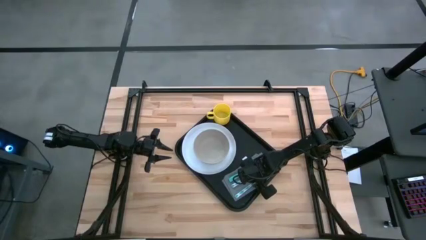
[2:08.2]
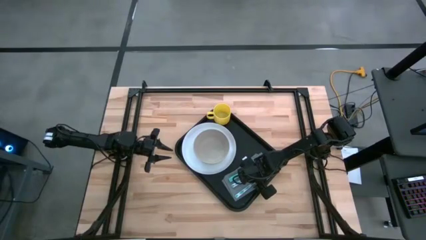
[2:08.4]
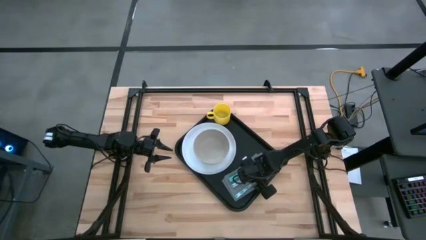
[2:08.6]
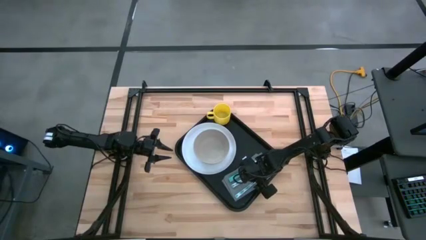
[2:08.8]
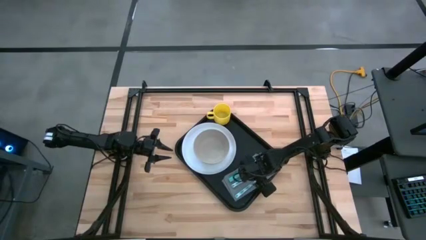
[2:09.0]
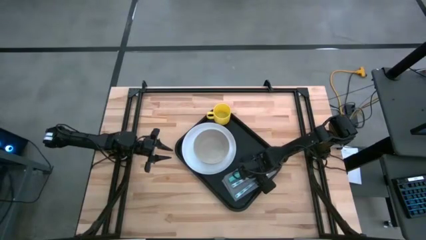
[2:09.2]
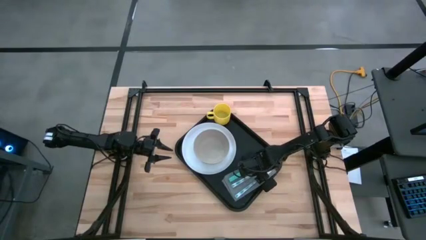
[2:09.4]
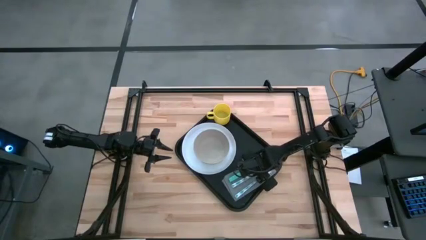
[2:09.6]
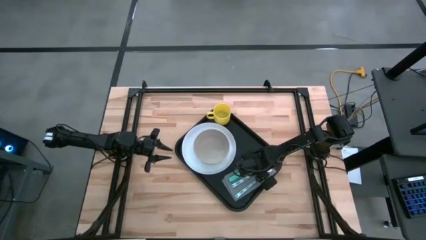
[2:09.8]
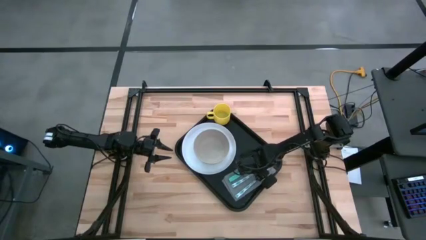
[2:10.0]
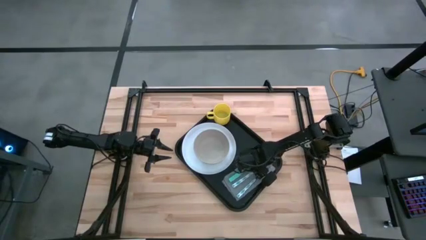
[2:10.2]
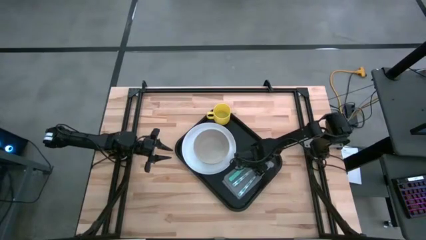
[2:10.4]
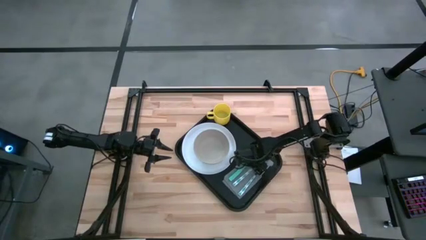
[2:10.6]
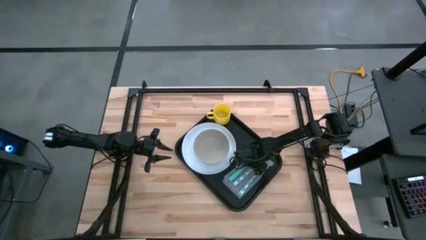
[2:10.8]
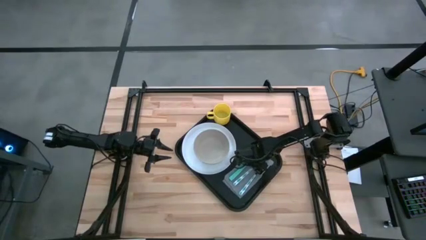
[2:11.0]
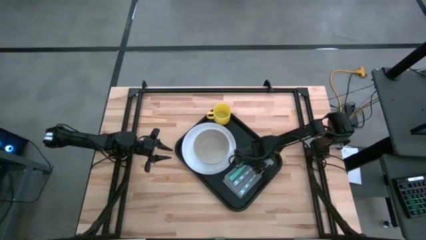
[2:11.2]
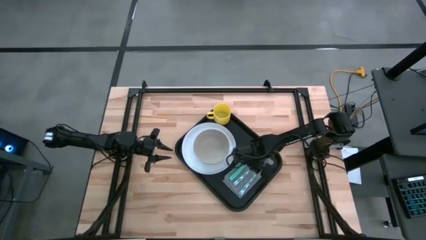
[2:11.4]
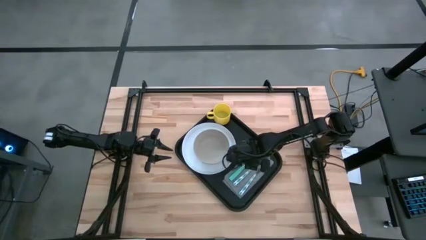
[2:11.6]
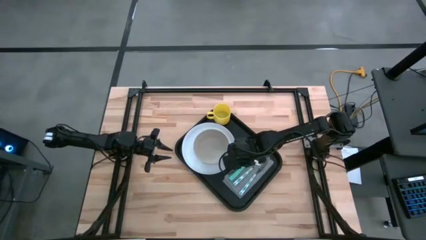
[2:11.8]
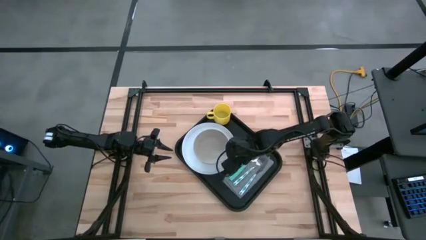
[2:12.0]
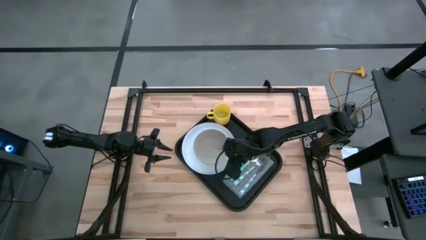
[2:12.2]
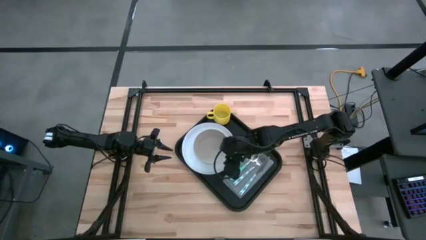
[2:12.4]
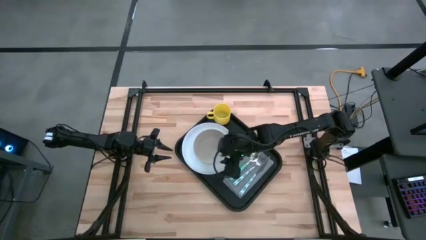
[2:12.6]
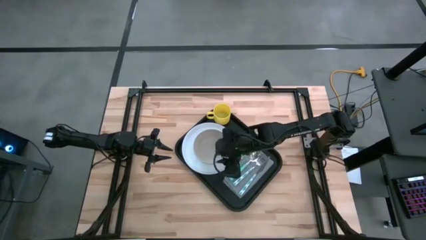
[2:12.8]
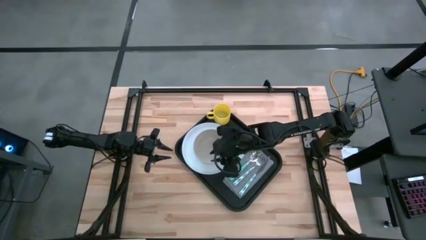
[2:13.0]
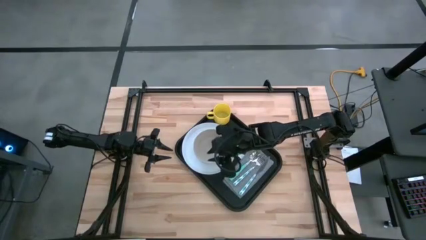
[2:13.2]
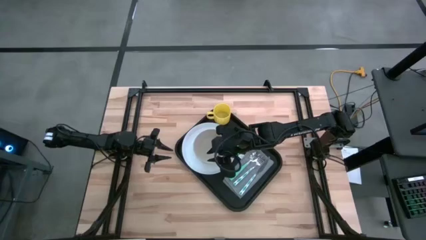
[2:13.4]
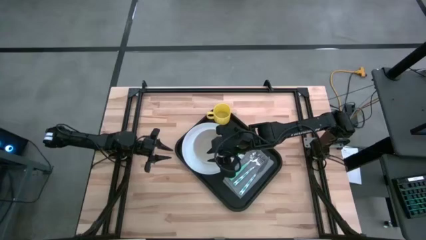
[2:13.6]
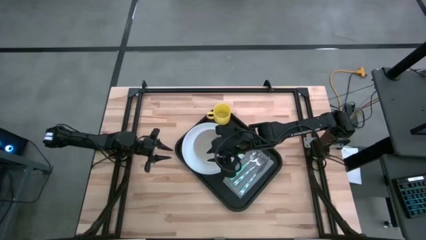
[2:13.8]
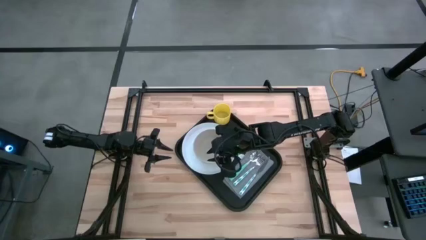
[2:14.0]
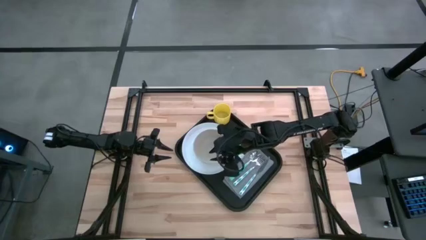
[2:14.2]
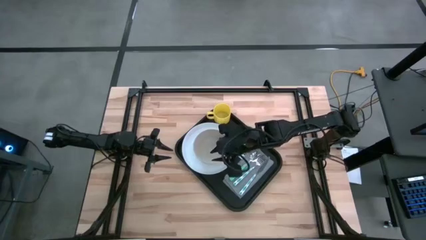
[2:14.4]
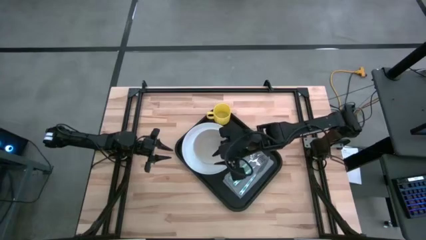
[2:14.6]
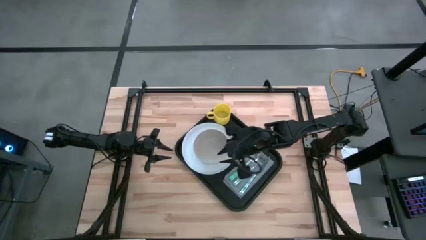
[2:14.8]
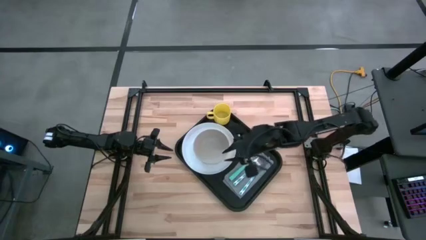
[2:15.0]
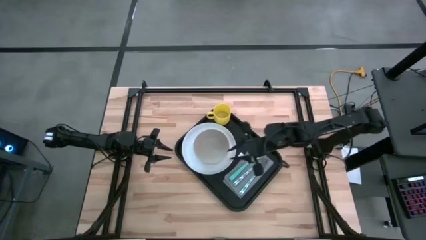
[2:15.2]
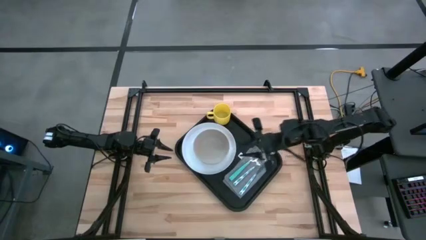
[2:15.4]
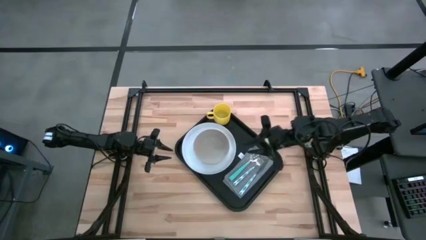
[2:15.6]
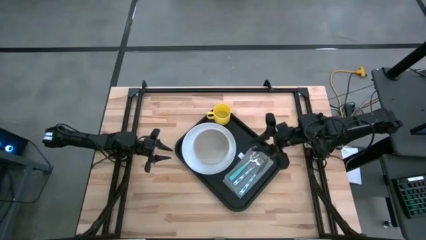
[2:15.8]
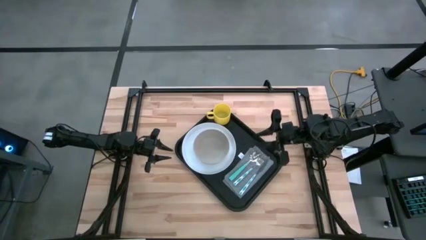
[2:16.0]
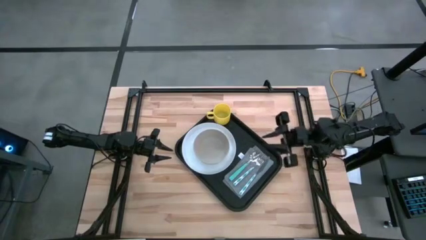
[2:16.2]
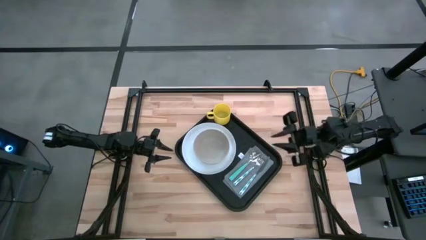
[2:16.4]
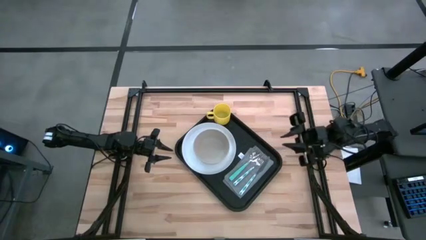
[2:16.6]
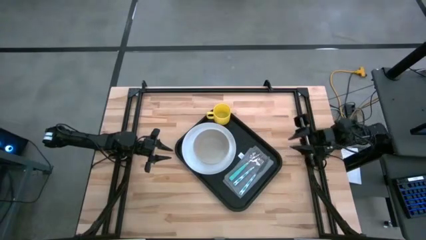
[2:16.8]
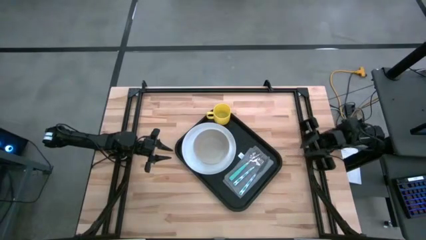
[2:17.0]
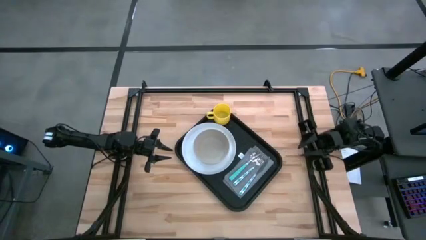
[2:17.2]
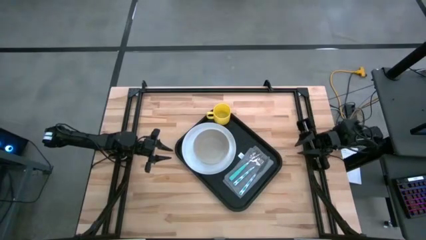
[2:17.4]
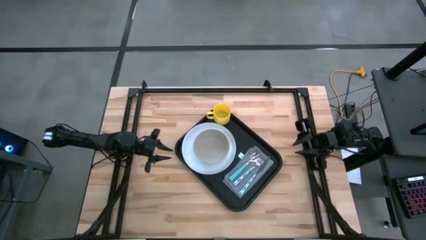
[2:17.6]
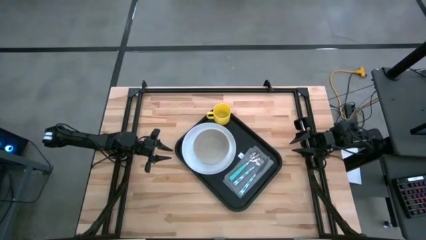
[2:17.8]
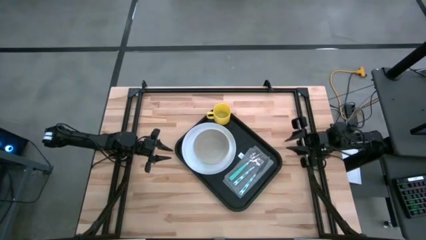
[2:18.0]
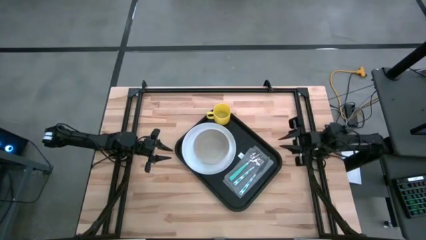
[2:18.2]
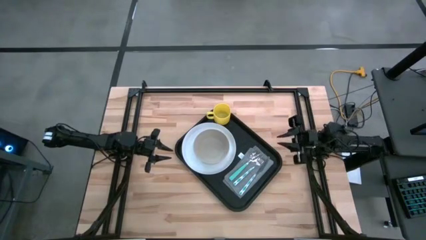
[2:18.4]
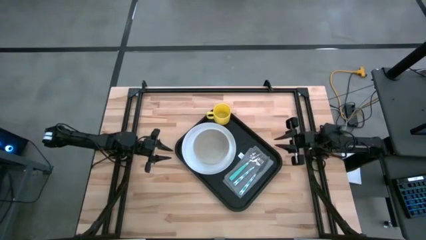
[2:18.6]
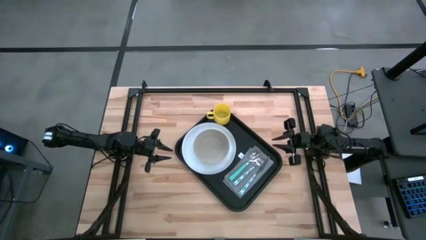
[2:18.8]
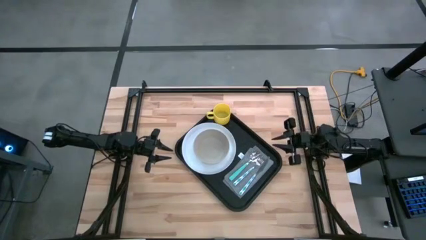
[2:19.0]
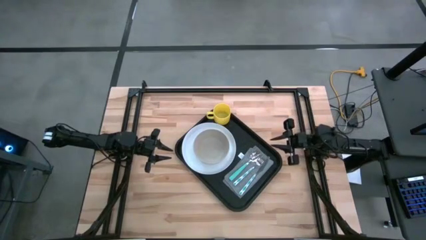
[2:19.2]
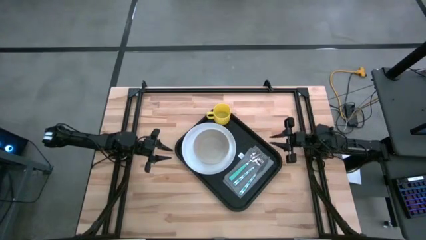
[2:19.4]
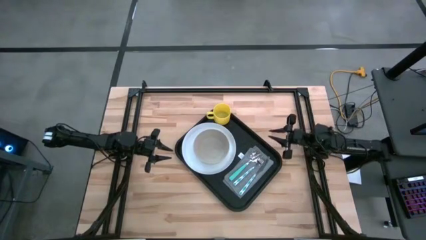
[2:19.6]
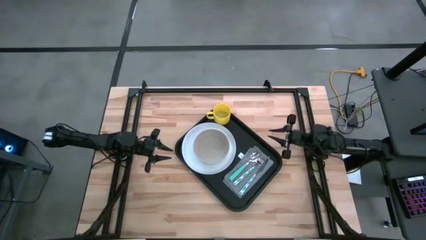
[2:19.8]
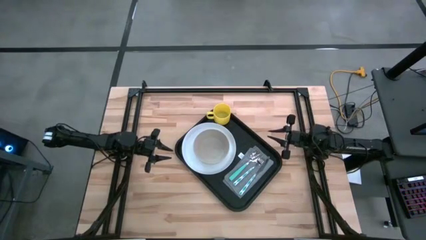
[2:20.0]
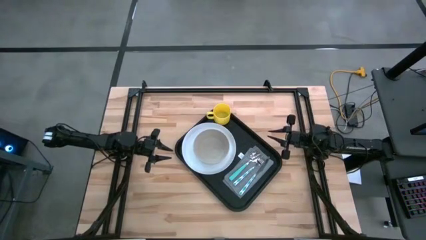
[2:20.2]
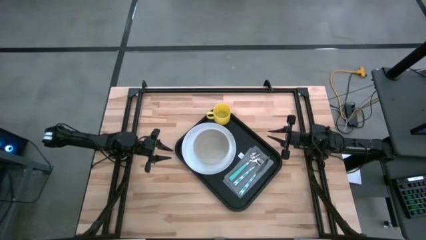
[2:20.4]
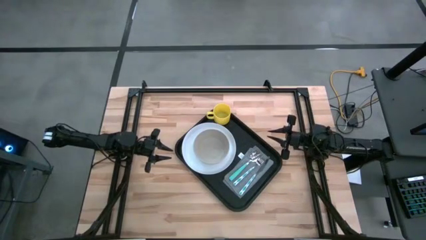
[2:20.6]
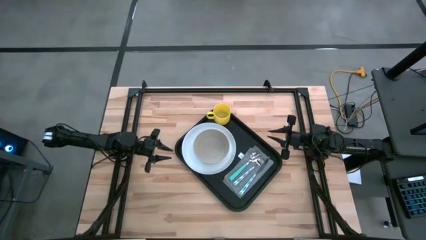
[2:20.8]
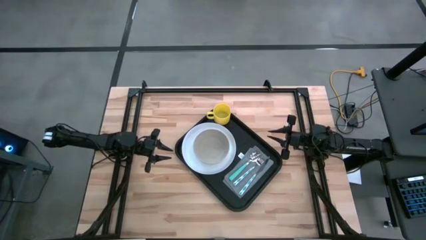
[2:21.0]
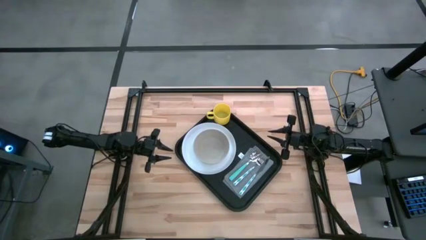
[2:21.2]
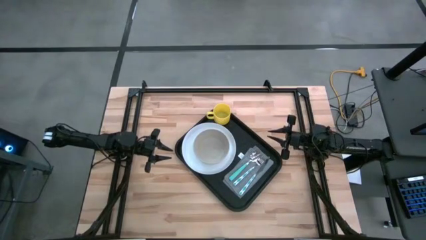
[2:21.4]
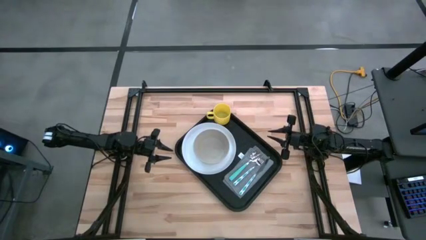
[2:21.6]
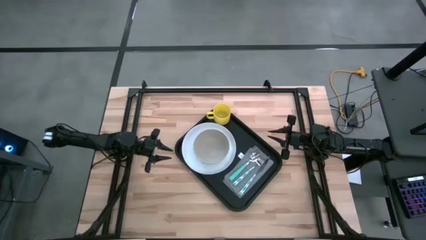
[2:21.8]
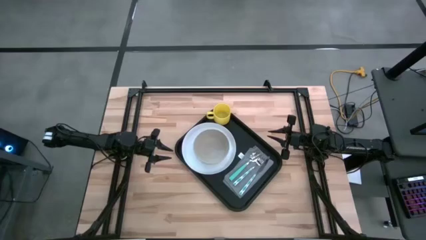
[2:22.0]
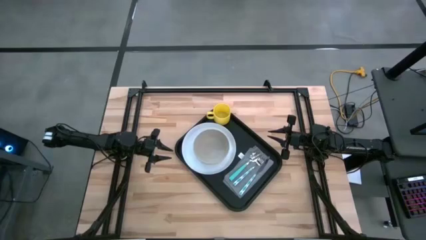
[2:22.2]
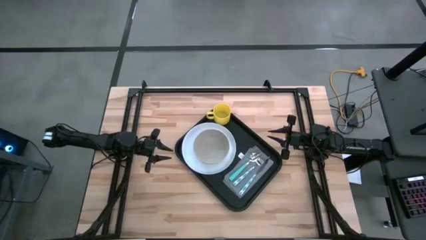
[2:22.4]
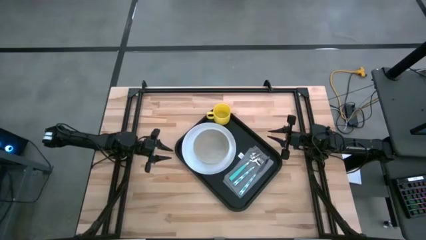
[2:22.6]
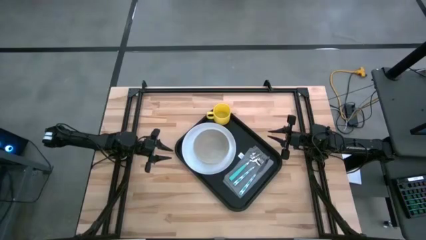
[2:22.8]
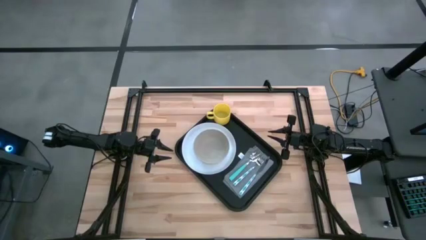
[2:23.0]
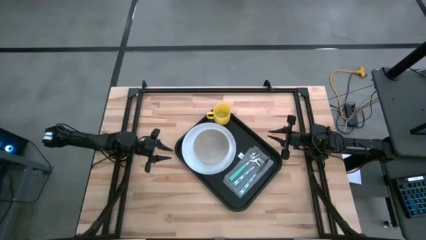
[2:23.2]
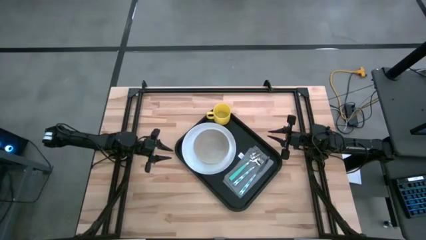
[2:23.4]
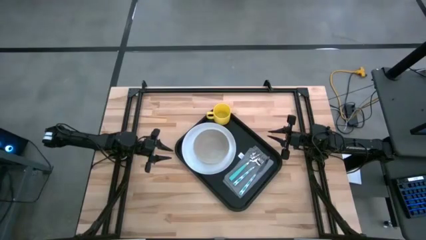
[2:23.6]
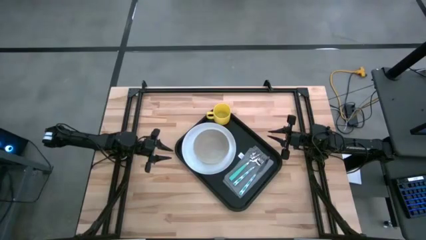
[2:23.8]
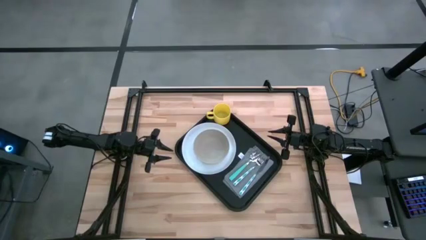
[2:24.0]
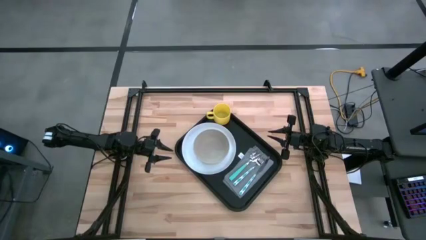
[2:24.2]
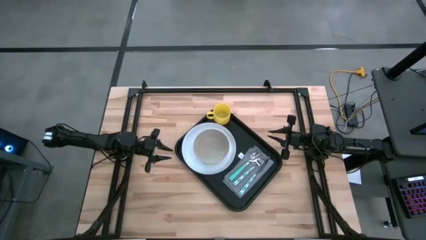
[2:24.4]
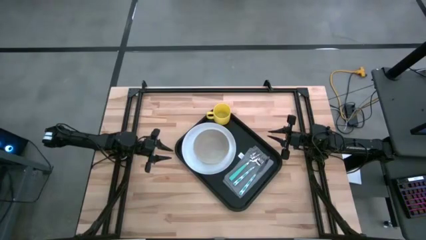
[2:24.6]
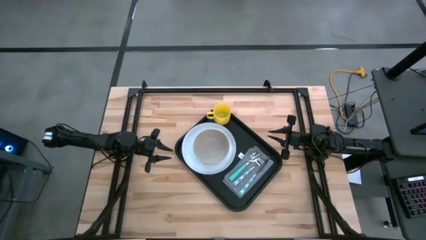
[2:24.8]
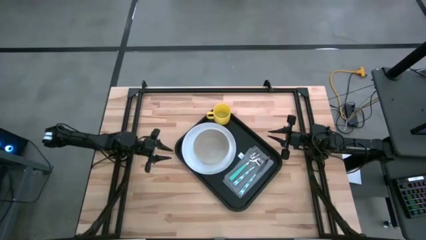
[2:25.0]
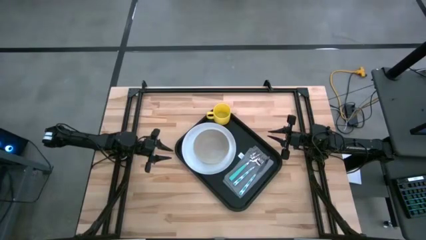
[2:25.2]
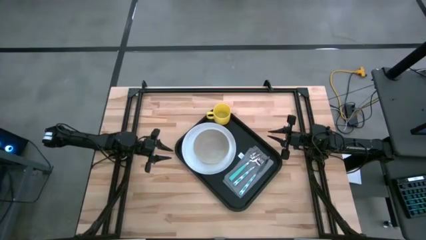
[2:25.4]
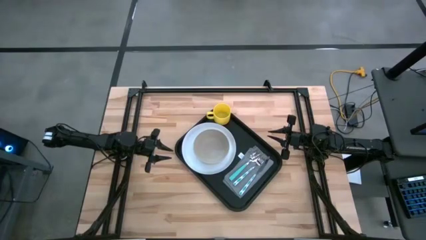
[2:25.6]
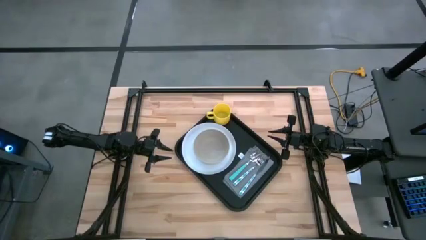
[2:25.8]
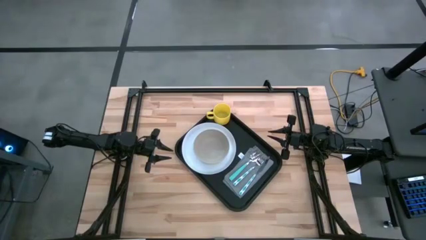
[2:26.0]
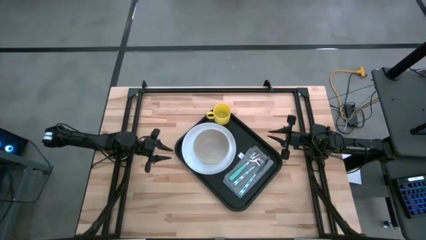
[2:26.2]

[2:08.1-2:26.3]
Task: Set up tray
Return to Home Position
